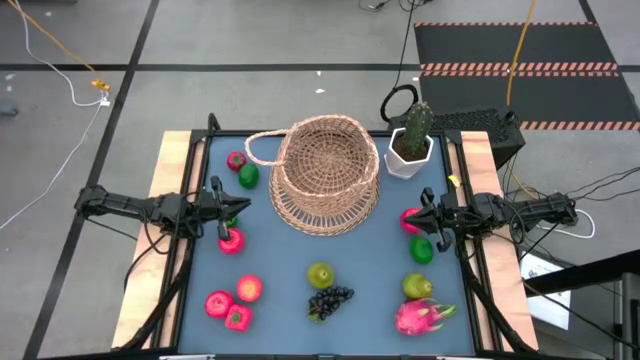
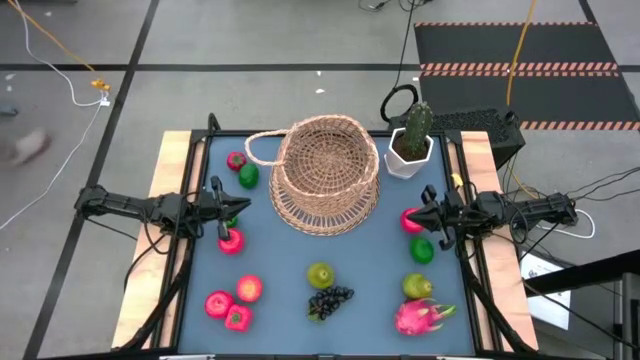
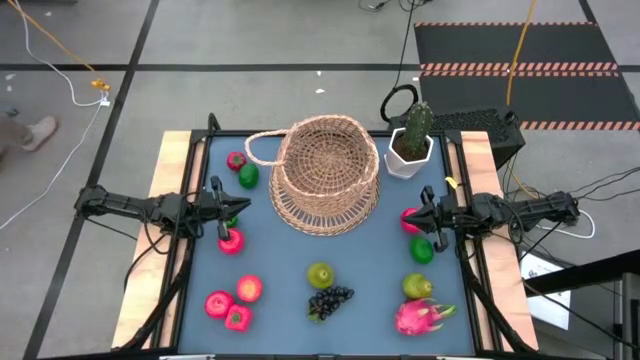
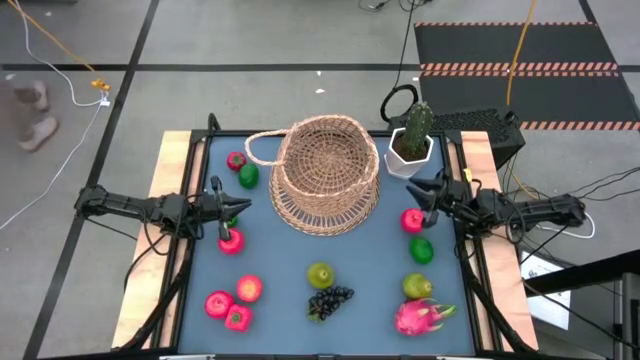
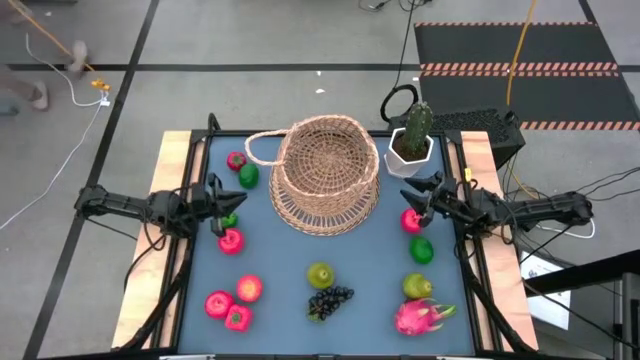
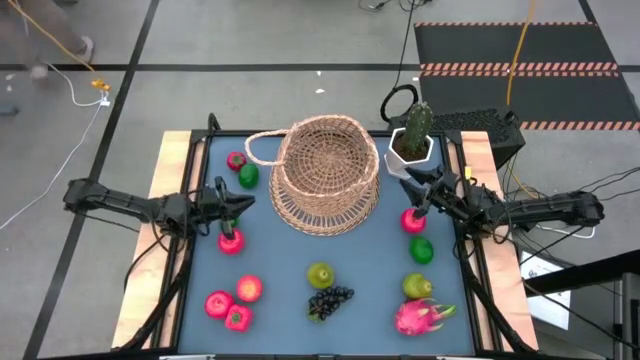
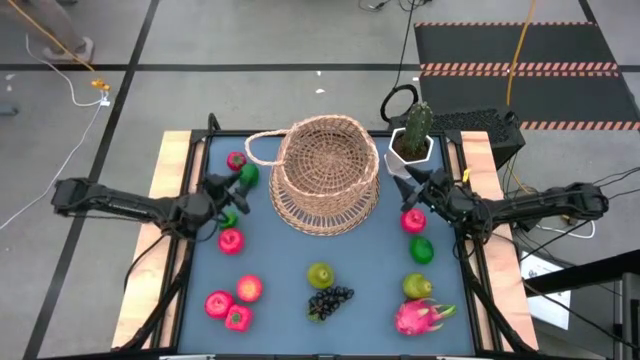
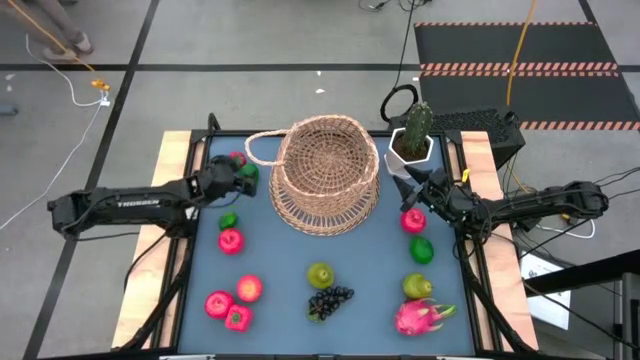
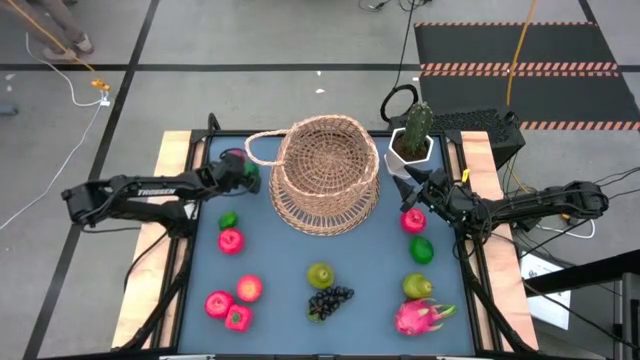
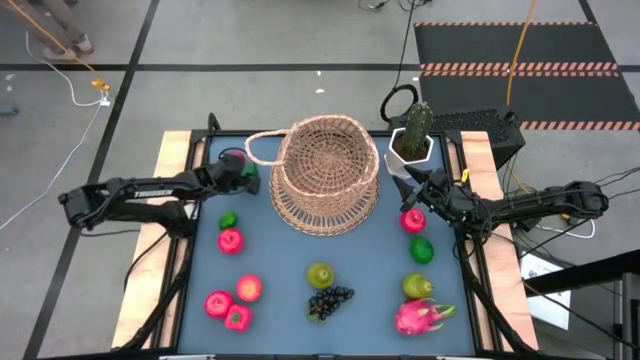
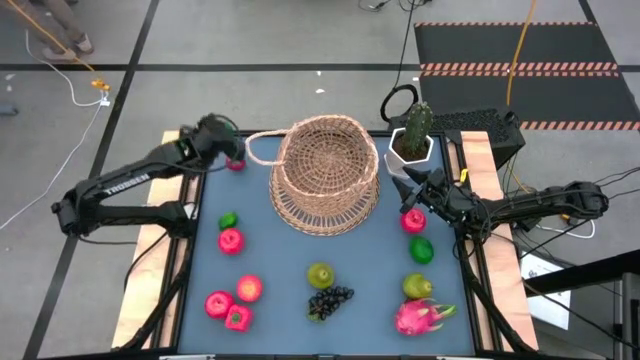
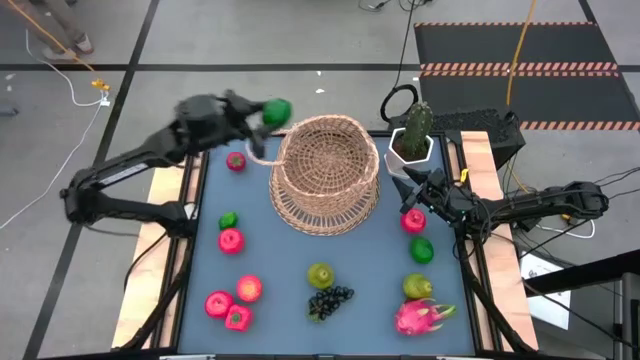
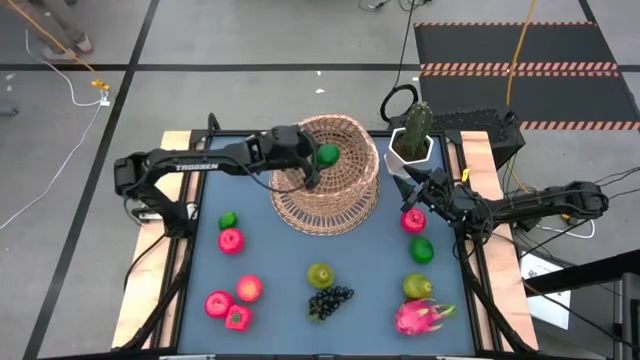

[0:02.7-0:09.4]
Task: Build produce basket
Put the green lime into the brown basket

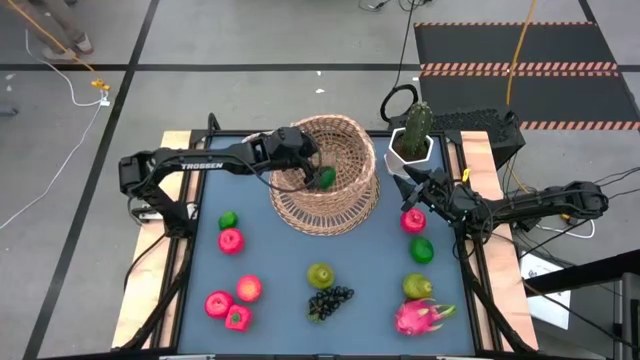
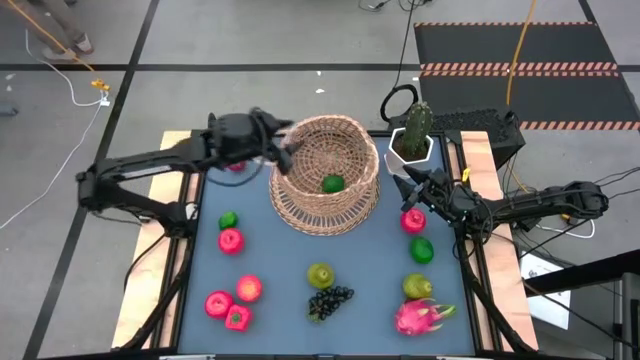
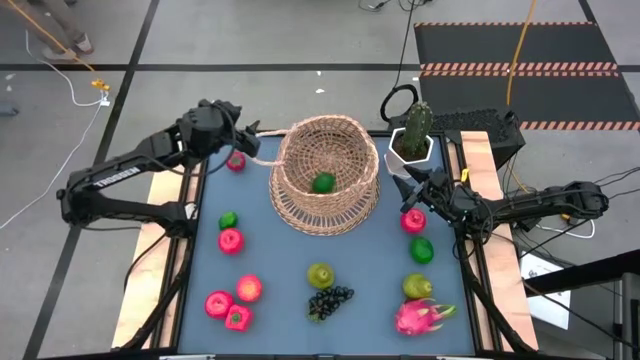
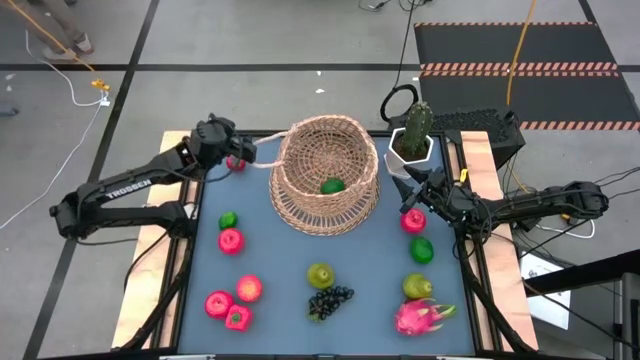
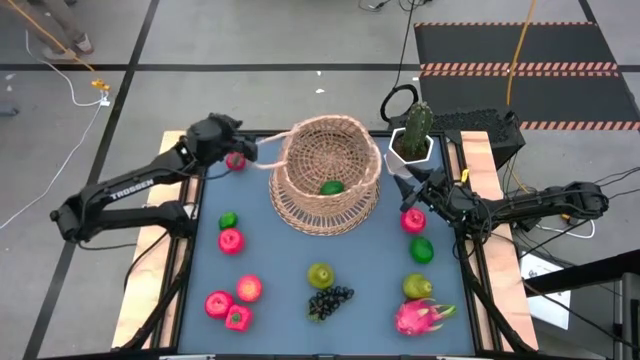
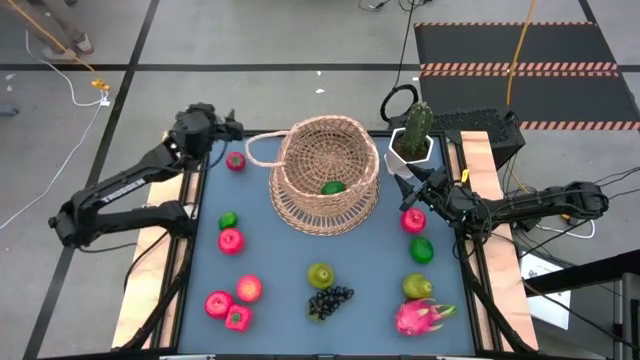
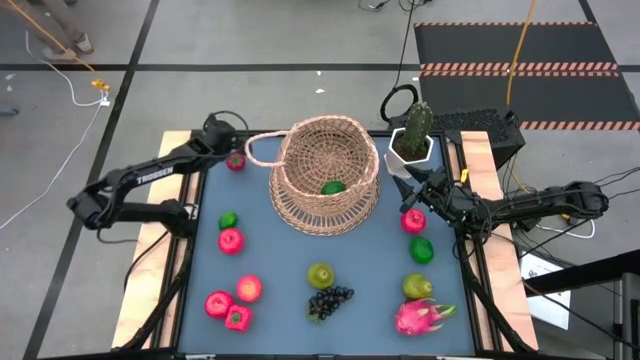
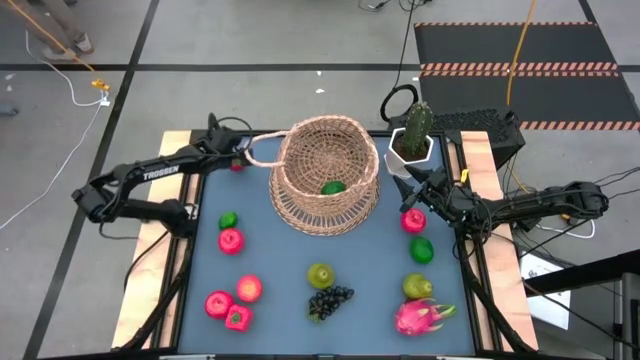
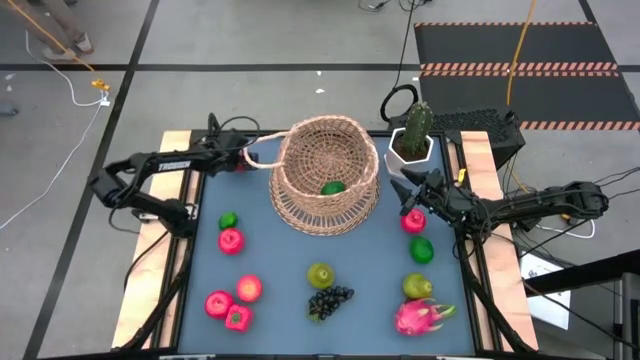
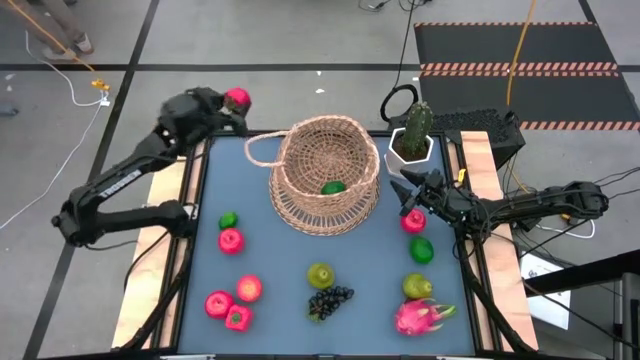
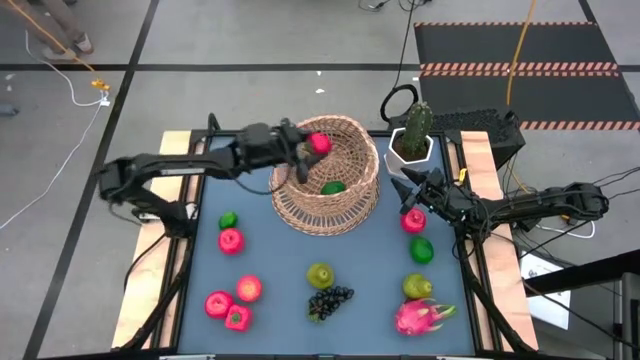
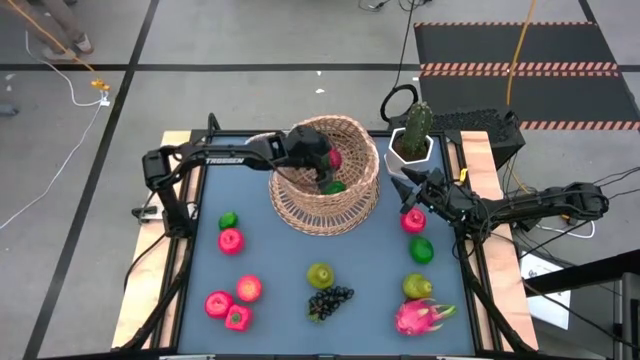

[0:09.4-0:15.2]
Put the red tomato into the brown basket

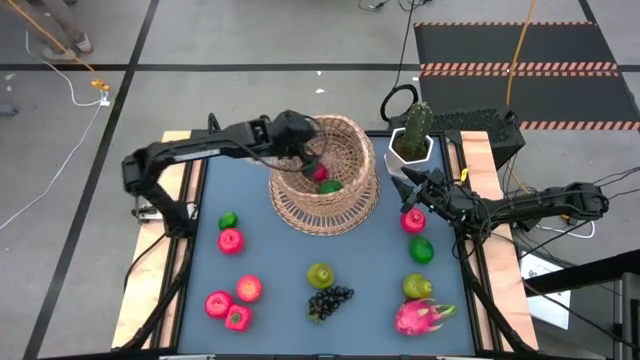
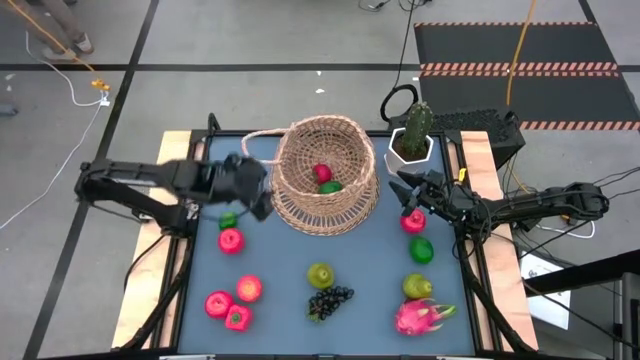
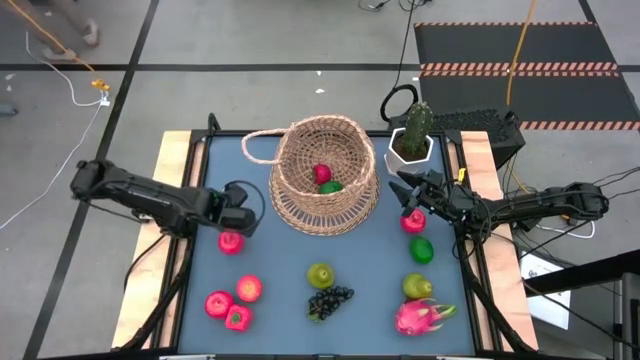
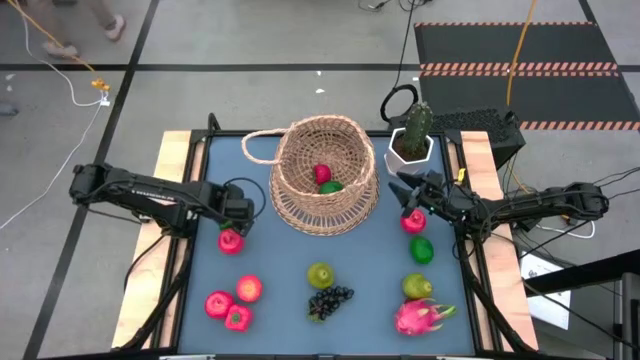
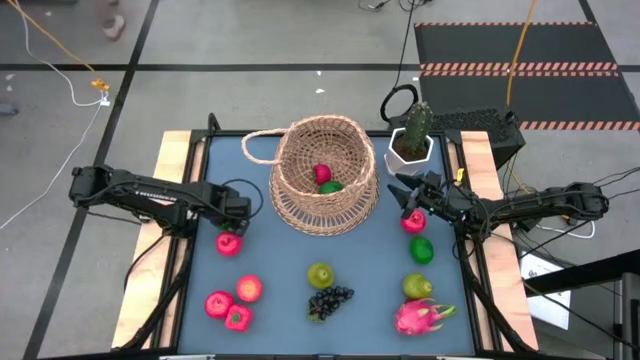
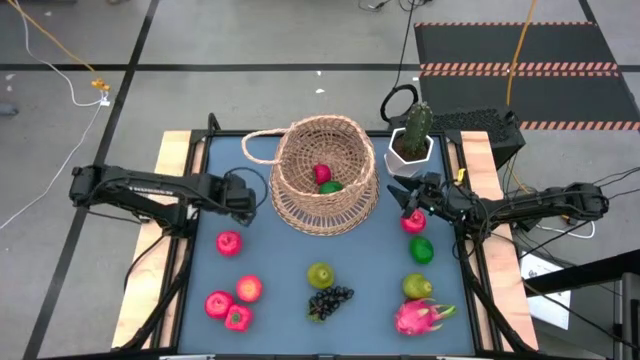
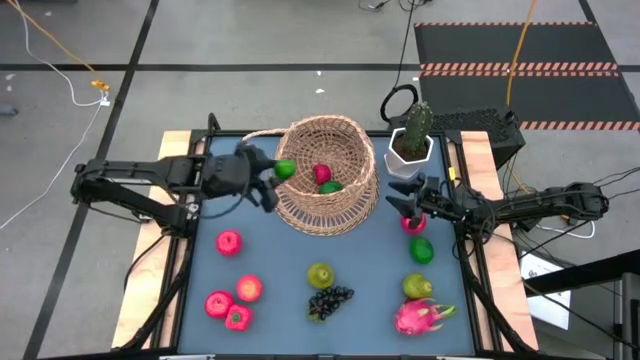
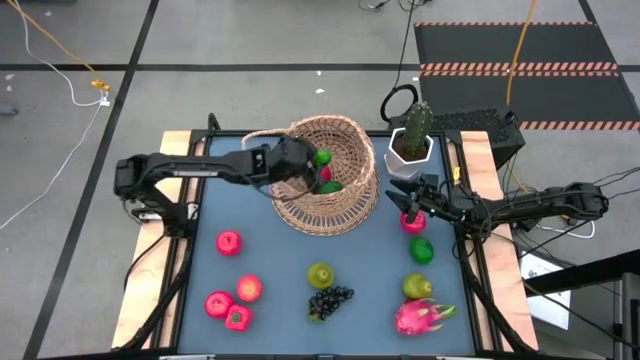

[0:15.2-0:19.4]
Put the green lime into the brown basket

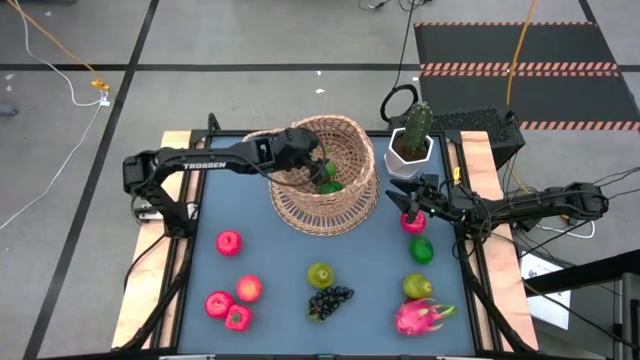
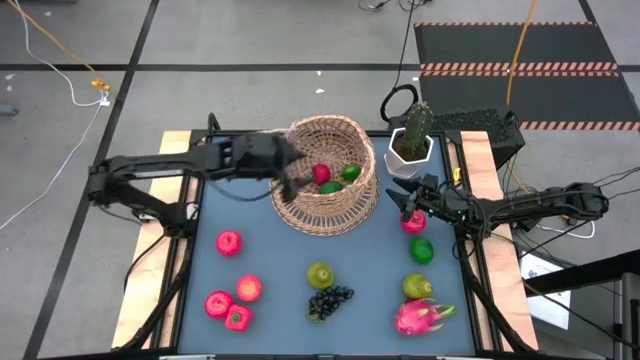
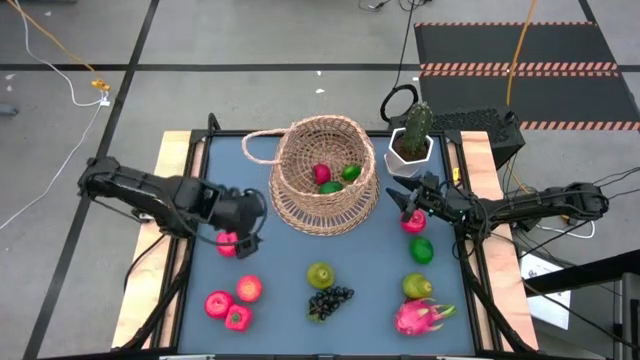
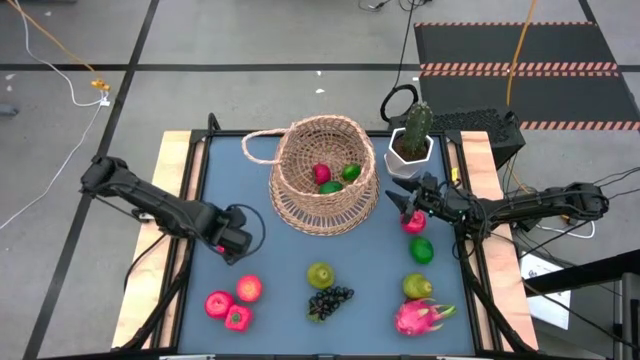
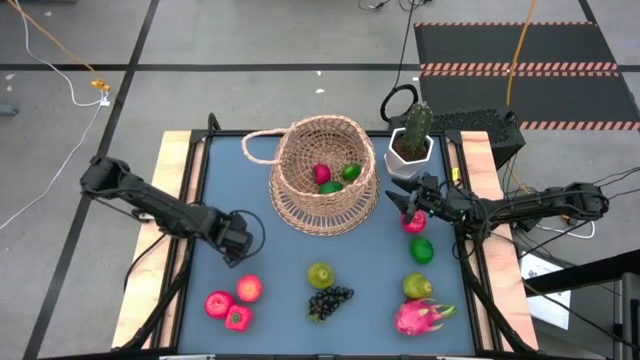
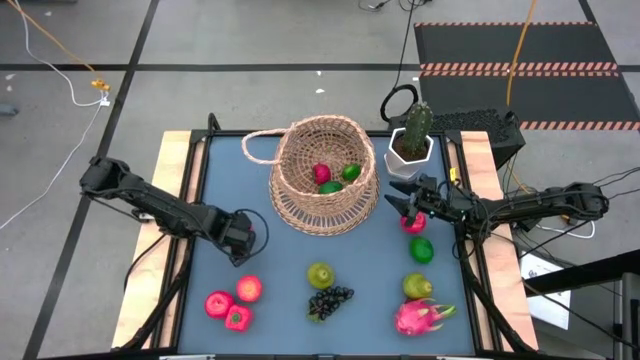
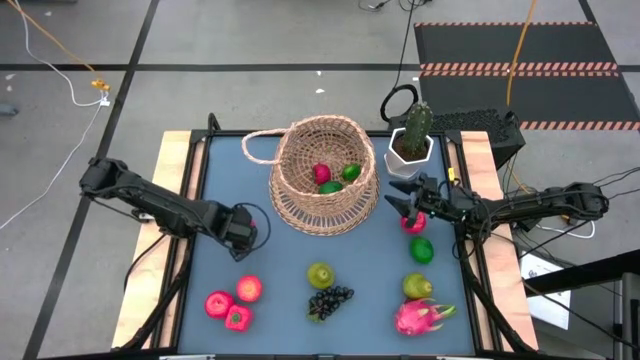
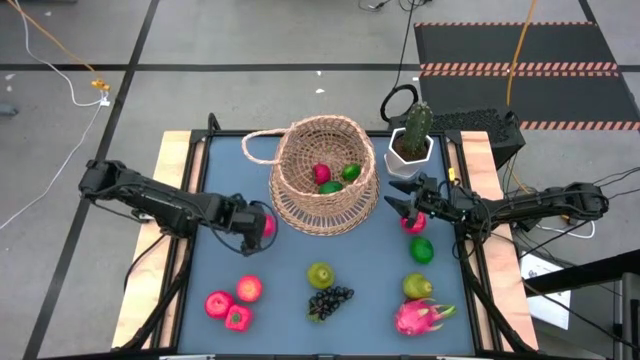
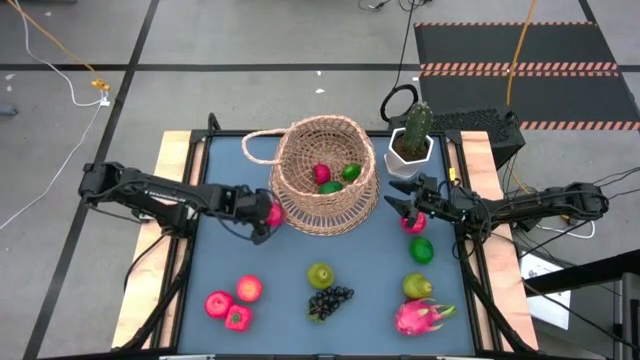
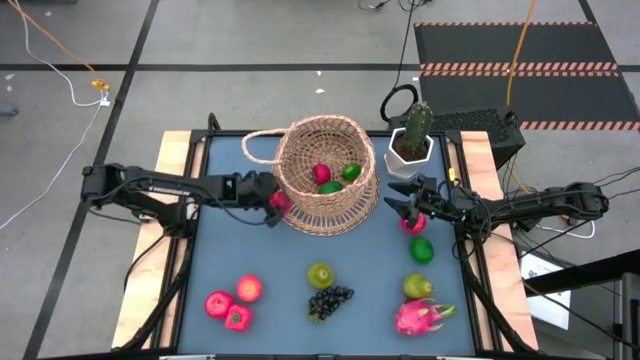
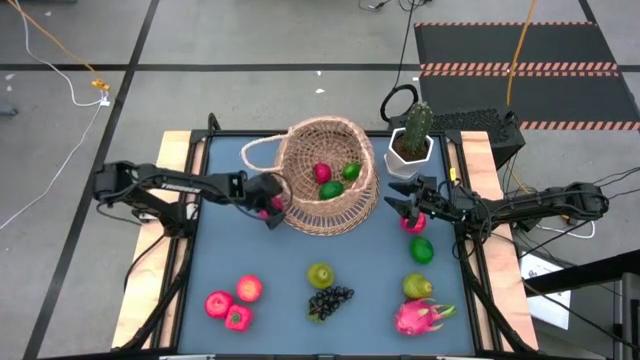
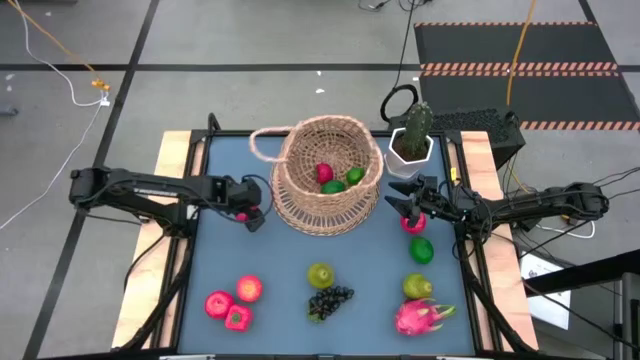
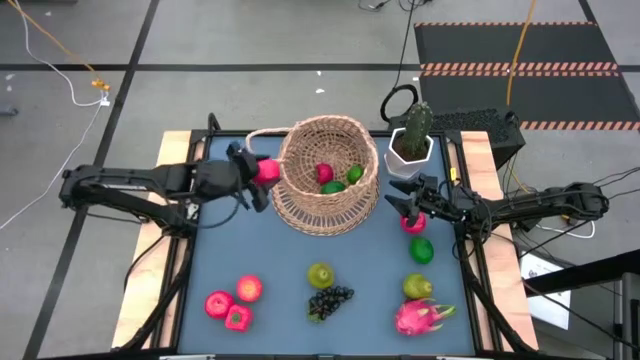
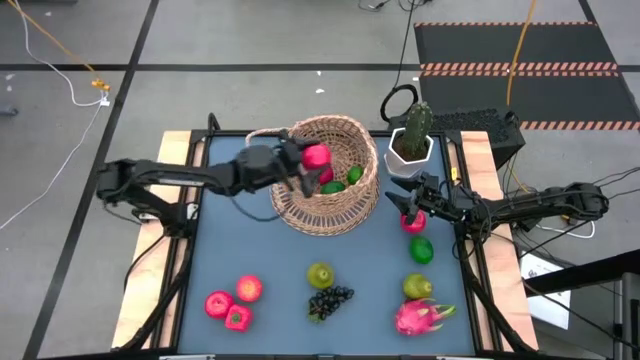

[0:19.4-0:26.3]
Put the red apple into the brown basket
